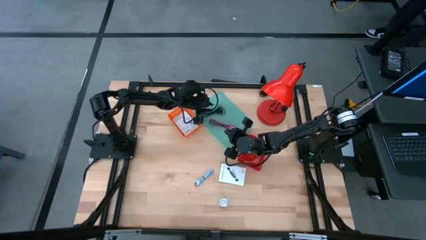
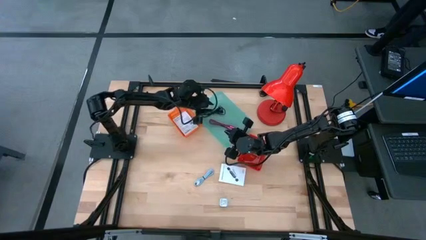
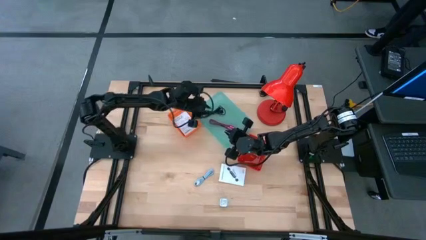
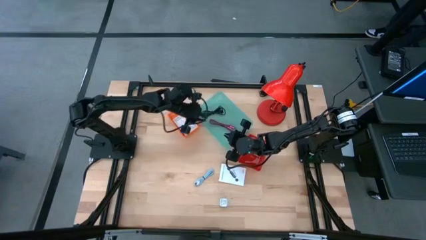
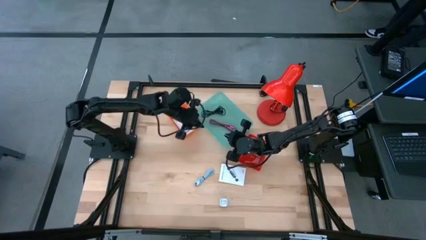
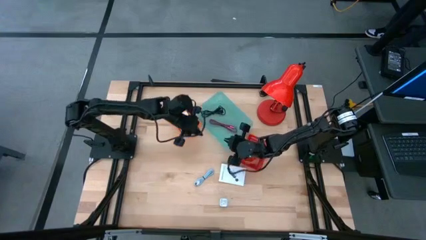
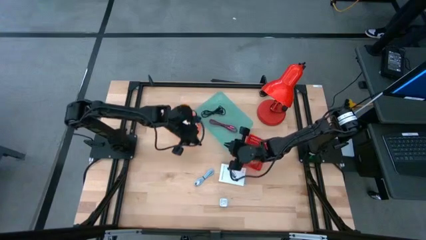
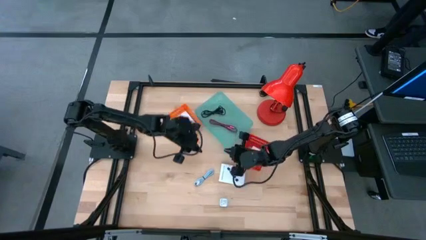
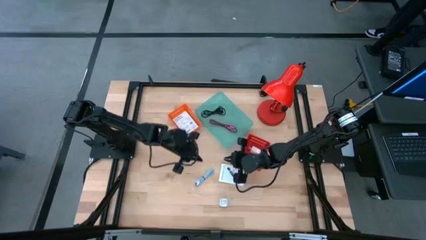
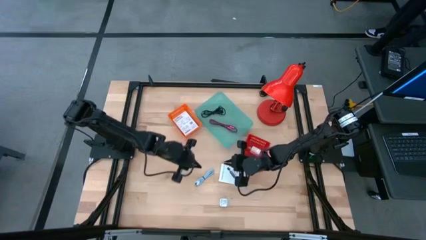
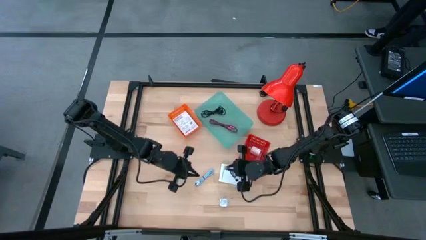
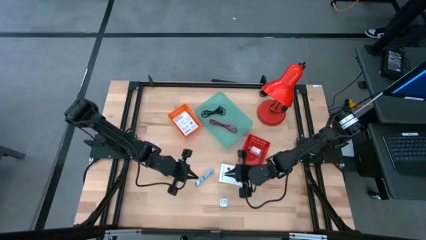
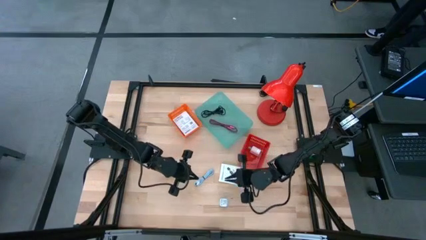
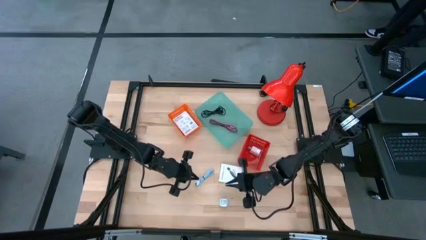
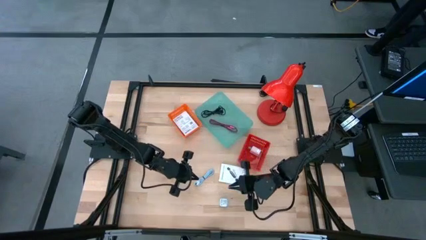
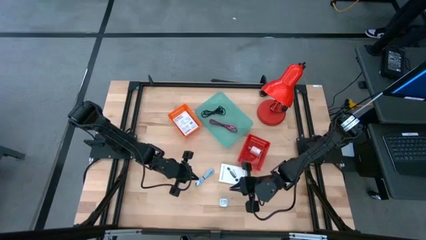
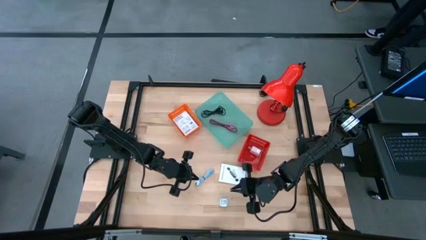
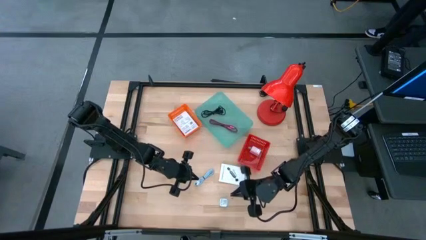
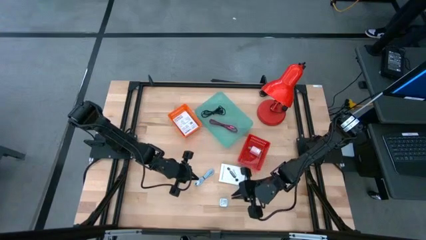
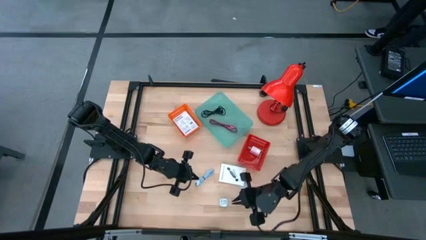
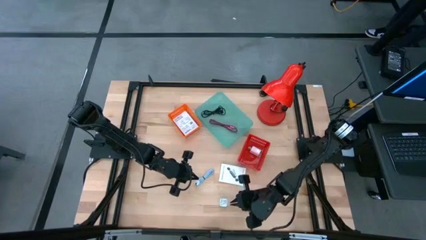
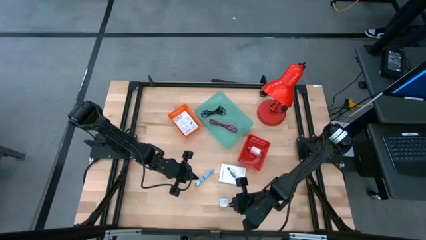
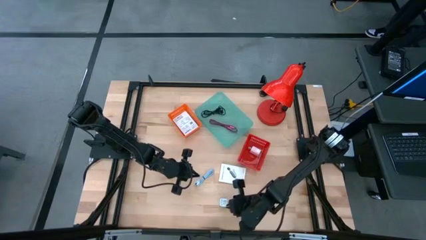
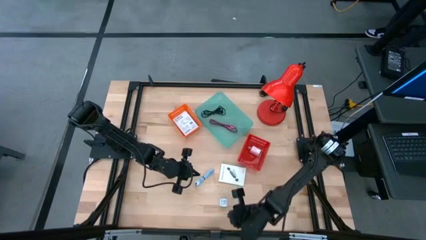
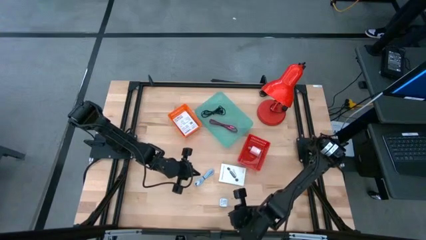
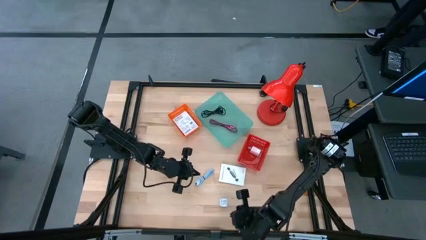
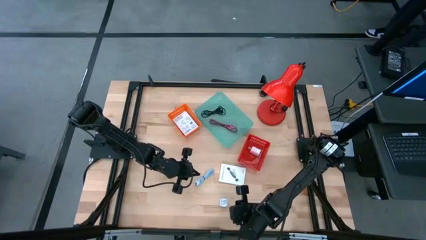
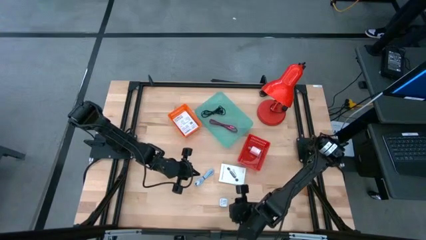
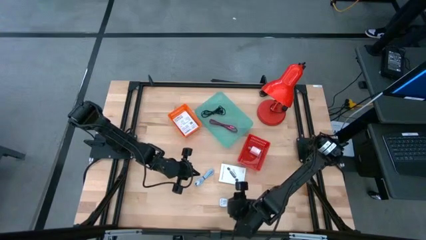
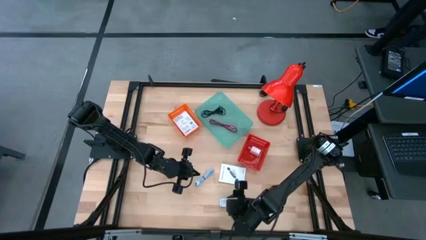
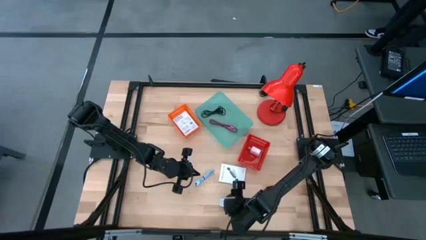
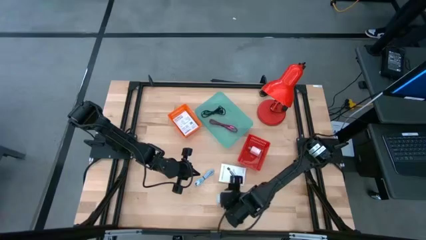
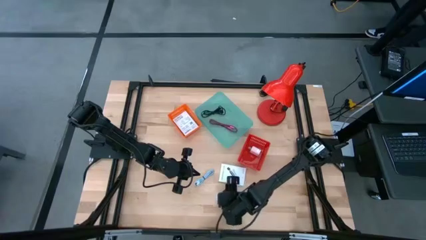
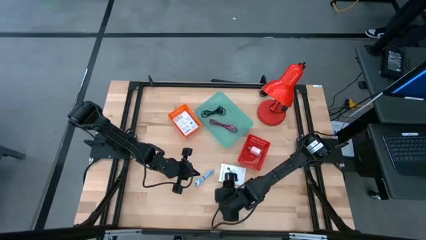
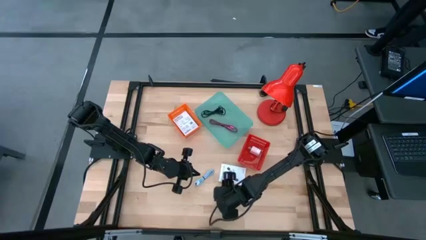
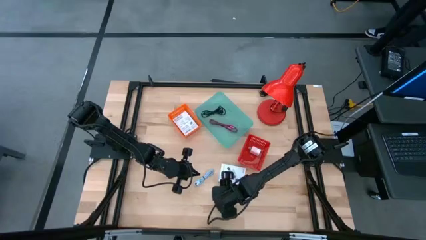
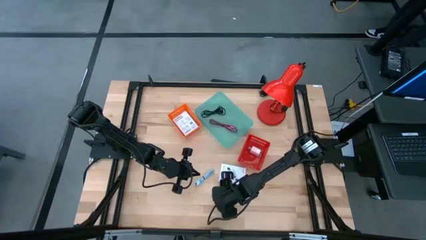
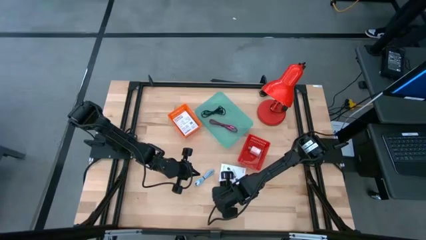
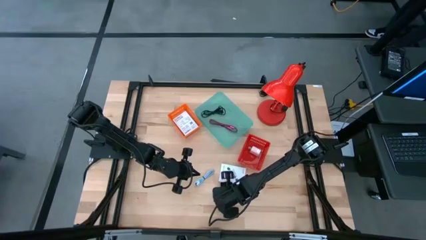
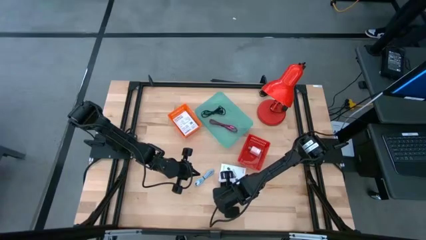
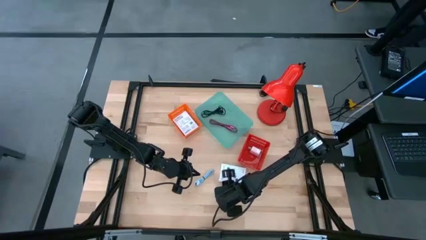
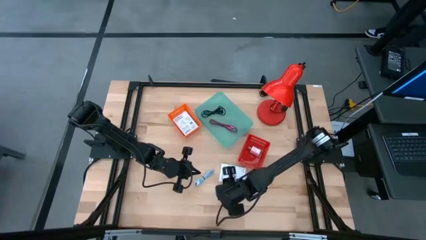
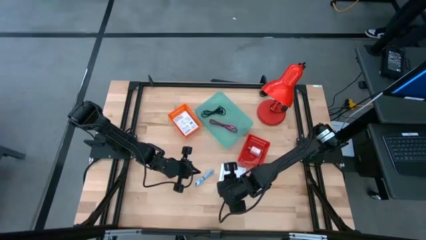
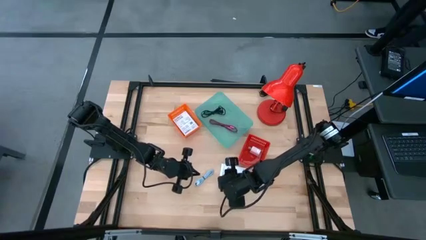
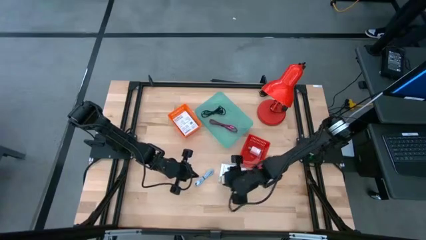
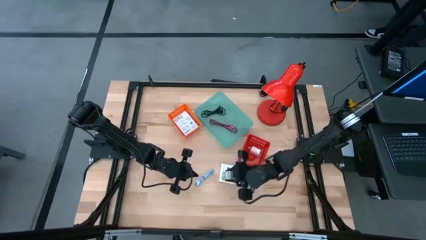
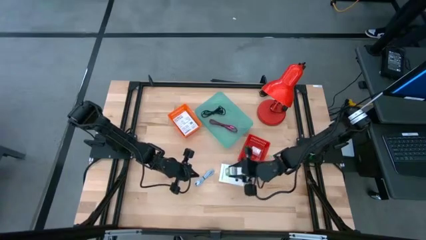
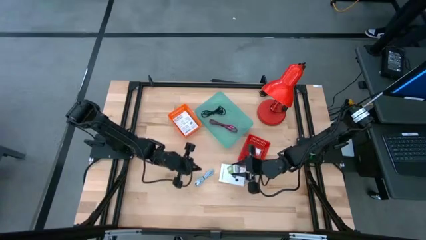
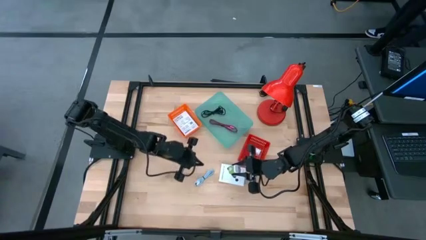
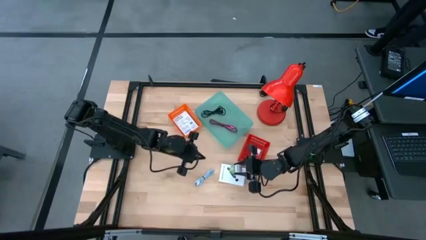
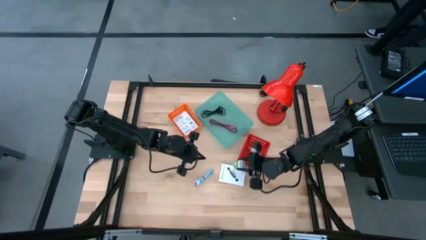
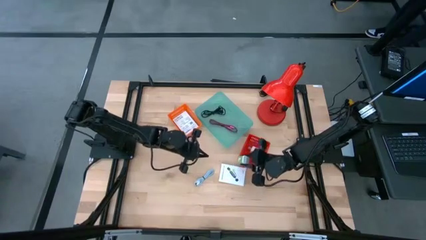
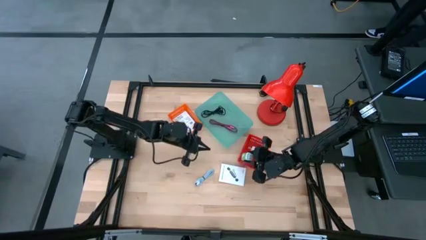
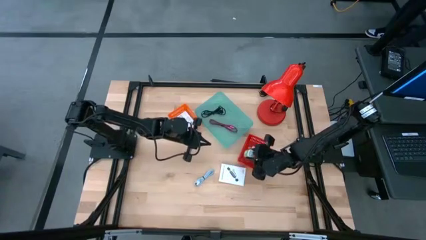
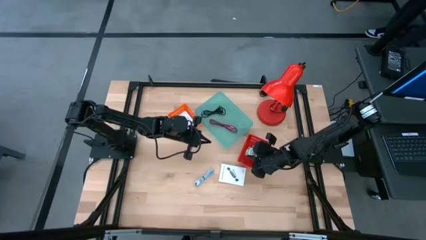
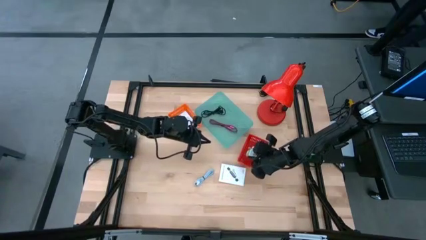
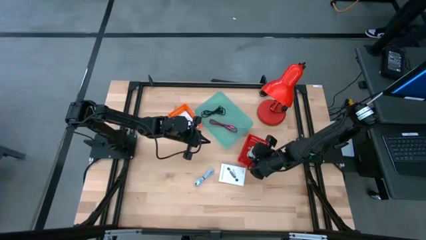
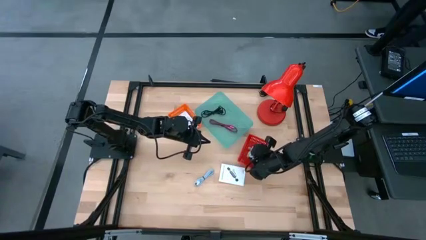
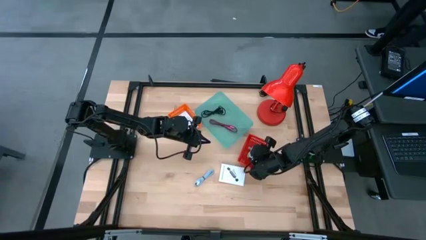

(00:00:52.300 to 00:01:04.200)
Task: Pick and place items into bin
Put the green charger adapter into the red bin

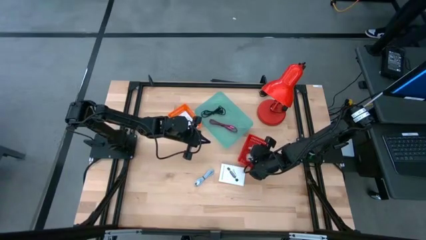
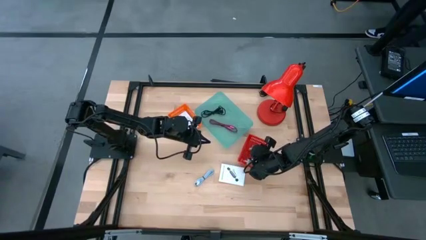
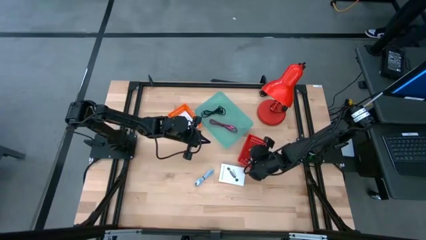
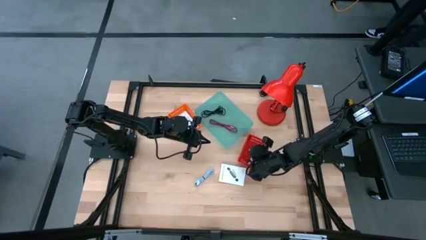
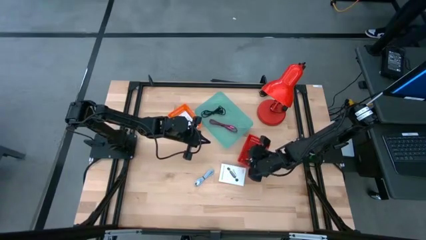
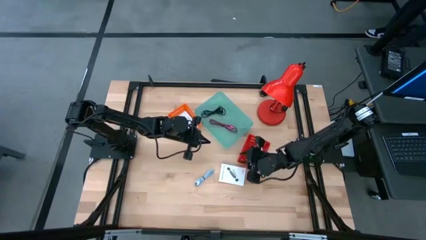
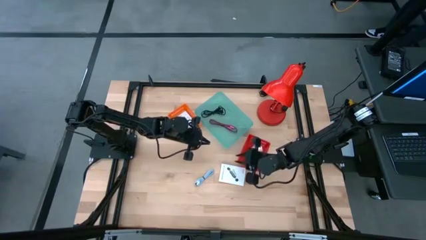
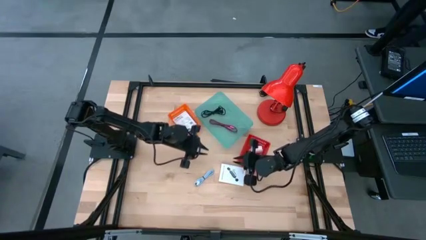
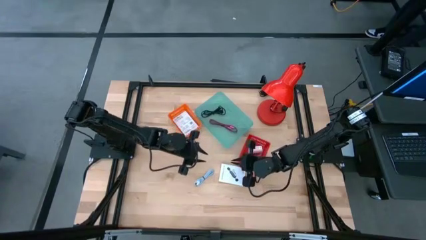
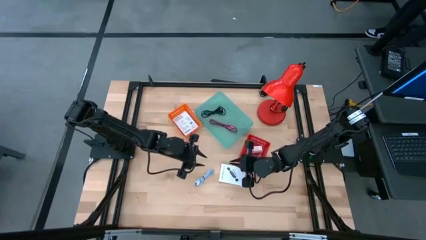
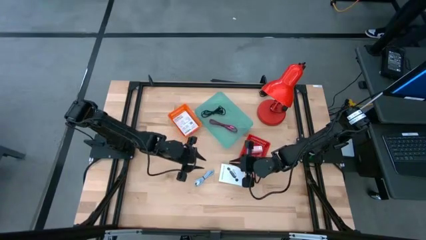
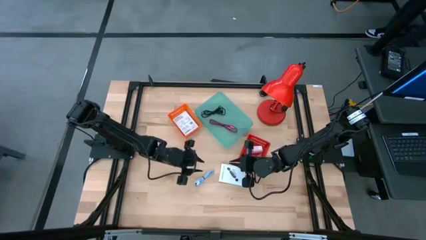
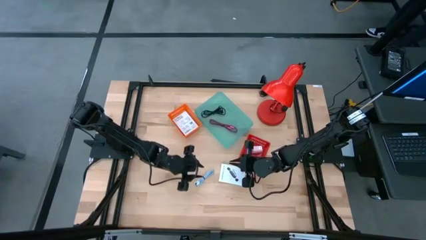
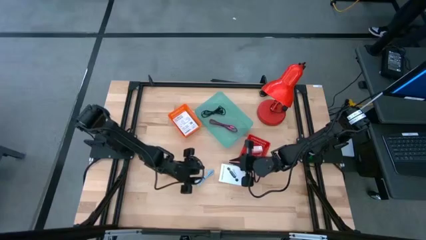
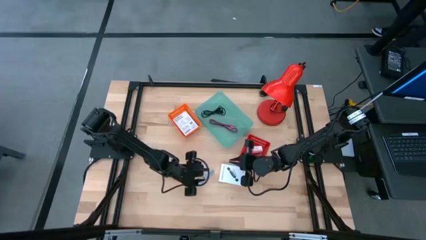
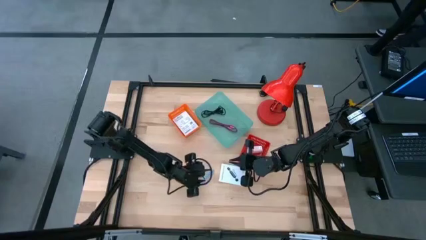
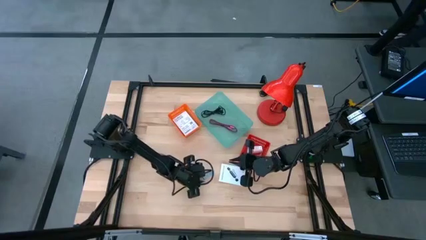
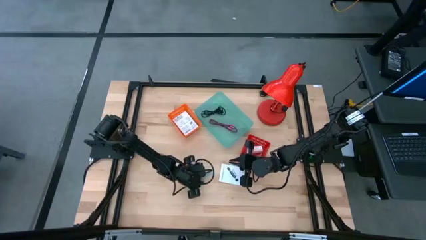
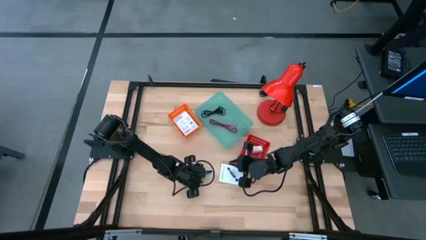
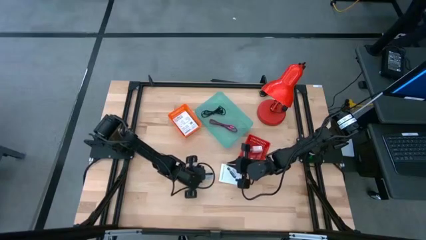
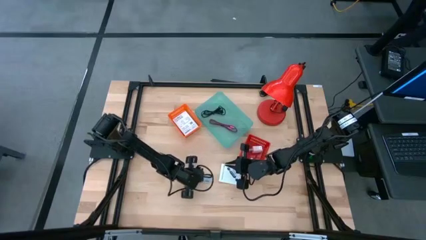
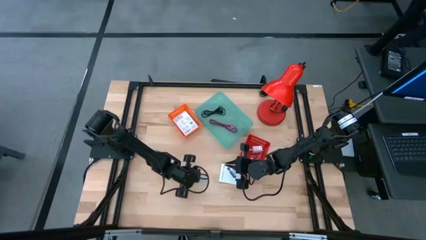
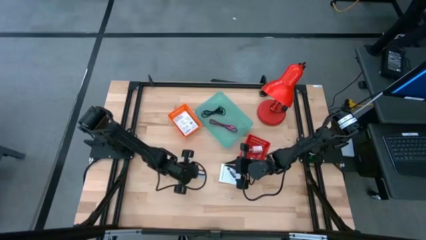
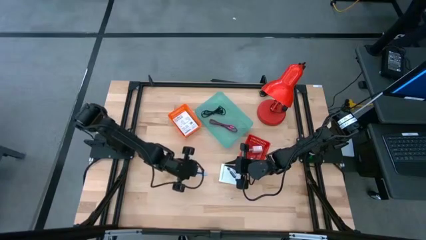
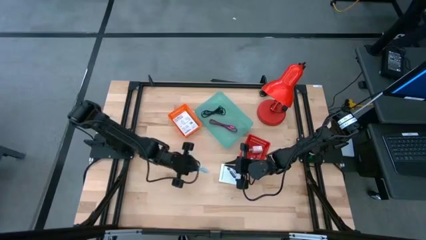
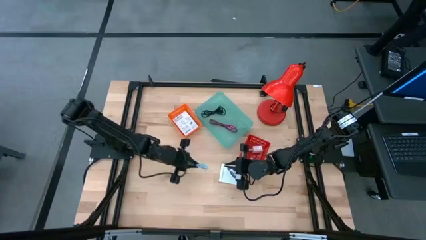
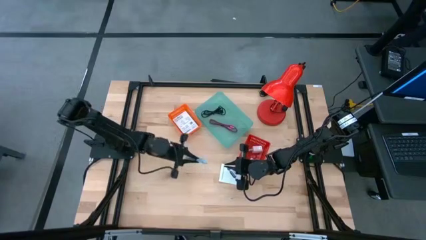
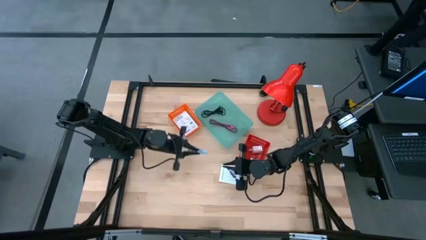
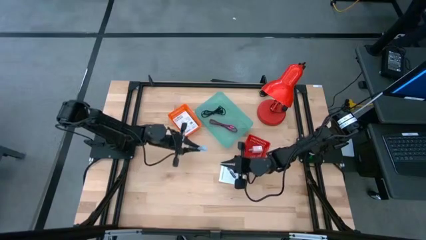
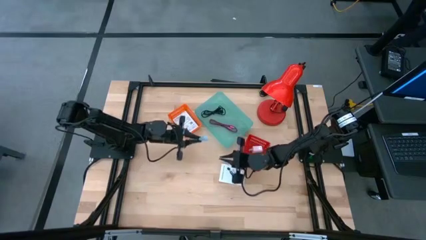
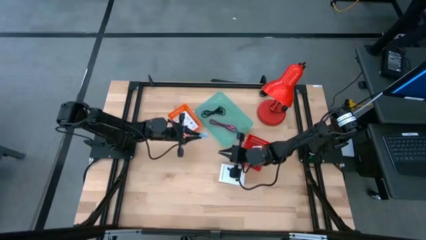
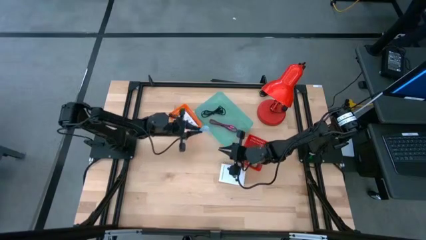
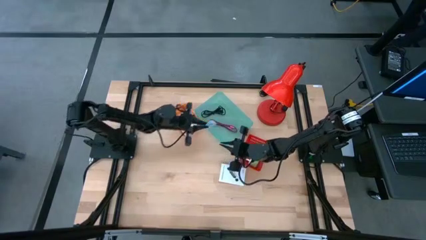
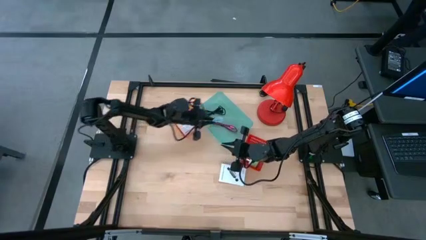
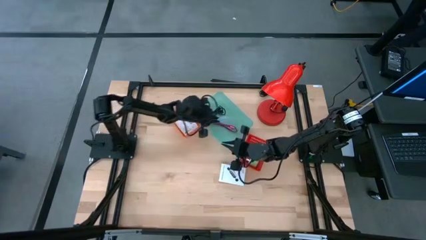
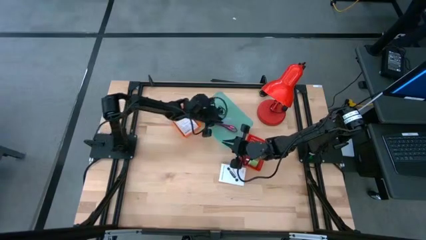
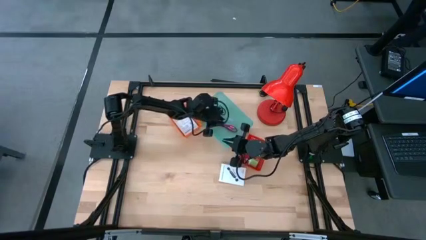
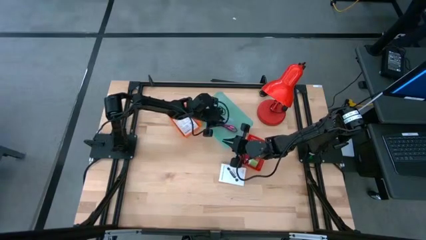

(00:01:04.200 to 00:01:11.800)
Put the blue charger cable into the blue bin
